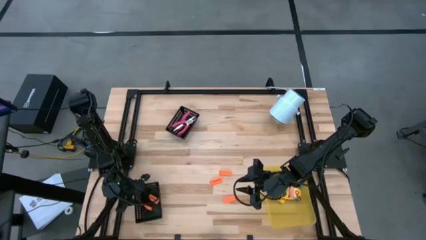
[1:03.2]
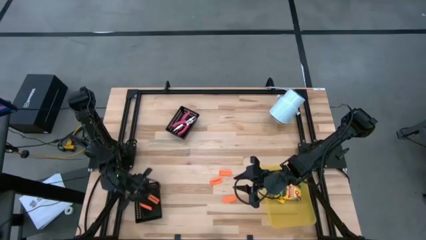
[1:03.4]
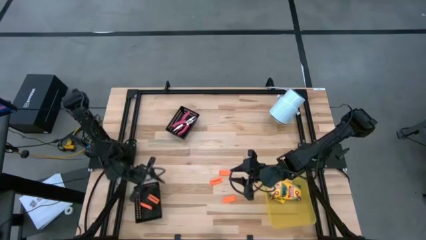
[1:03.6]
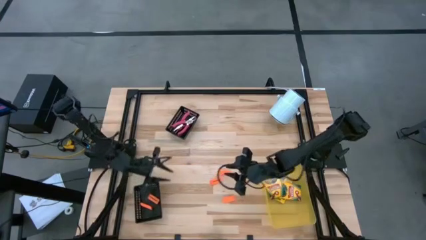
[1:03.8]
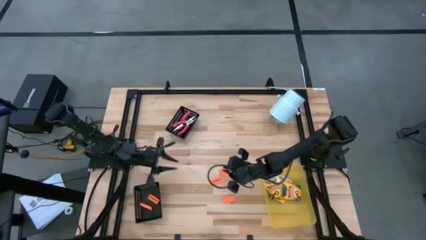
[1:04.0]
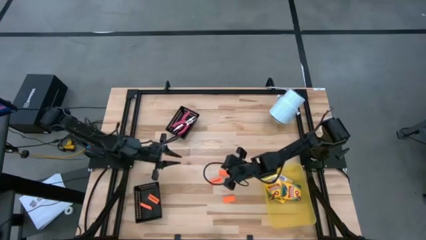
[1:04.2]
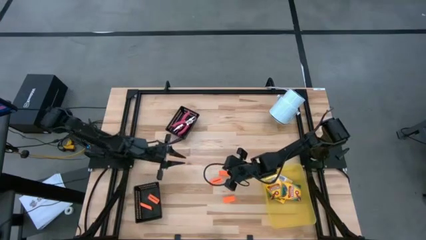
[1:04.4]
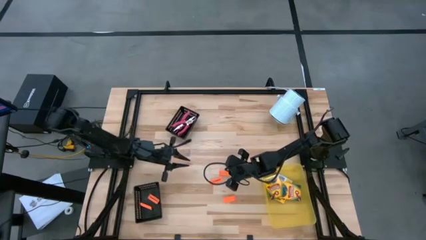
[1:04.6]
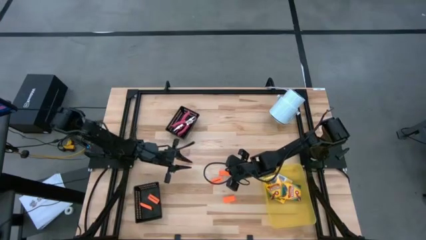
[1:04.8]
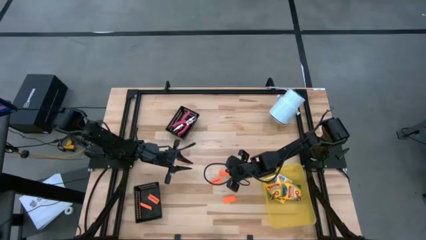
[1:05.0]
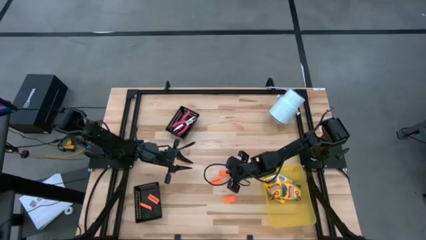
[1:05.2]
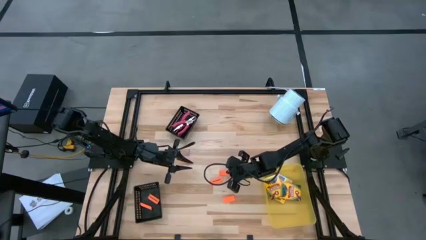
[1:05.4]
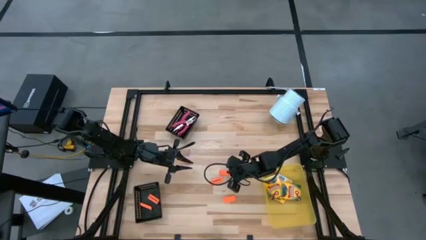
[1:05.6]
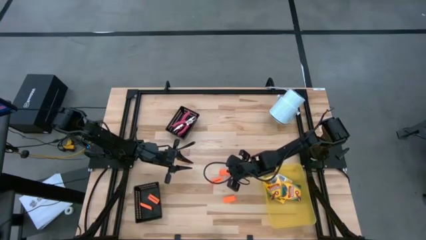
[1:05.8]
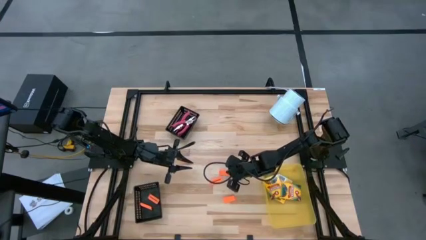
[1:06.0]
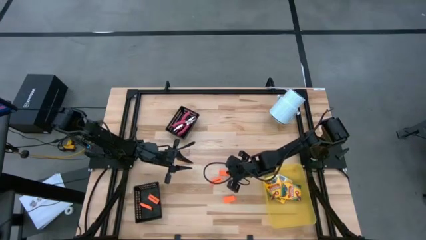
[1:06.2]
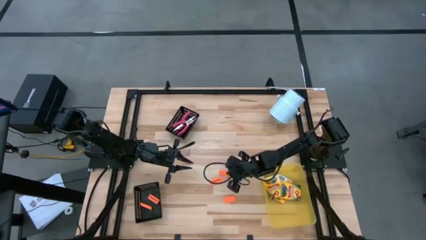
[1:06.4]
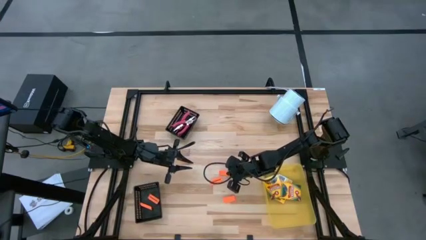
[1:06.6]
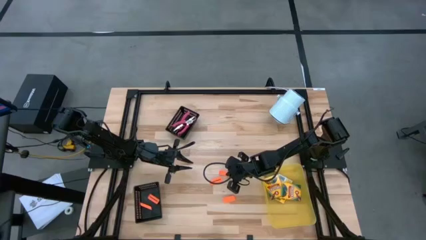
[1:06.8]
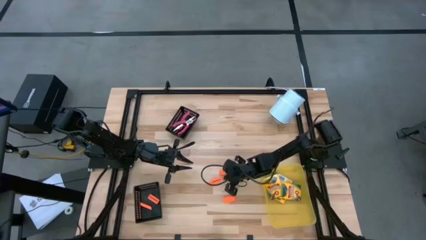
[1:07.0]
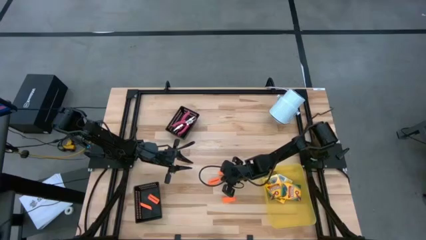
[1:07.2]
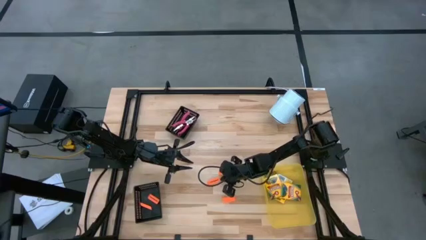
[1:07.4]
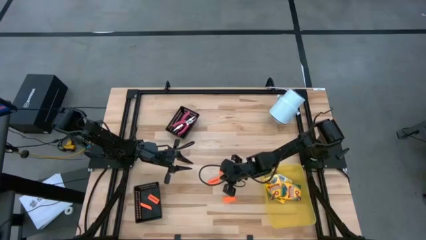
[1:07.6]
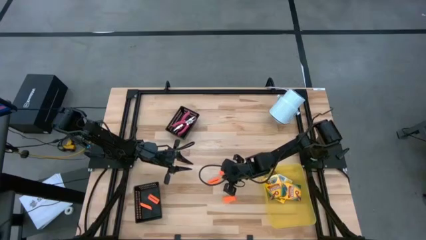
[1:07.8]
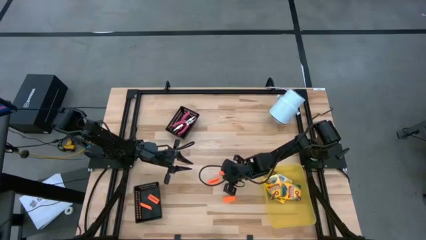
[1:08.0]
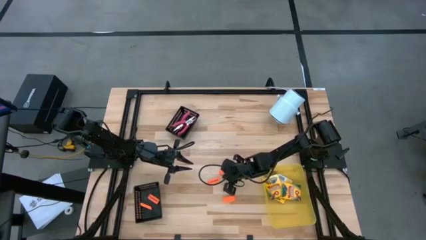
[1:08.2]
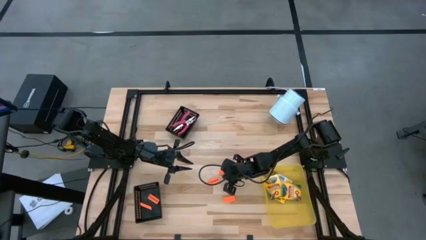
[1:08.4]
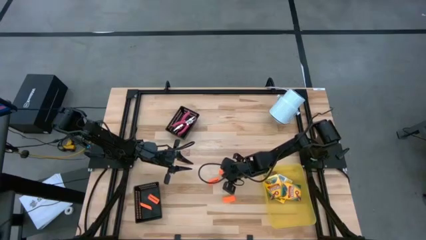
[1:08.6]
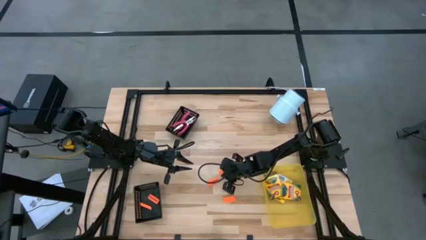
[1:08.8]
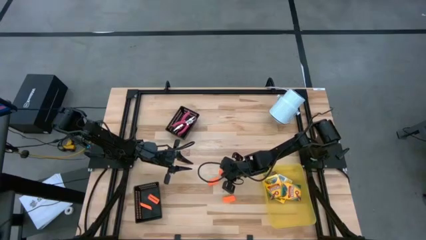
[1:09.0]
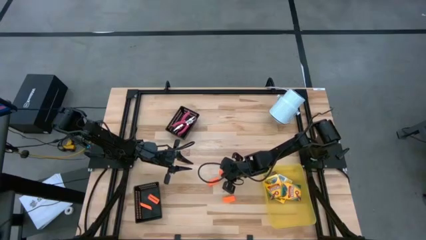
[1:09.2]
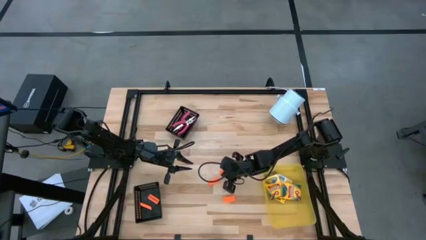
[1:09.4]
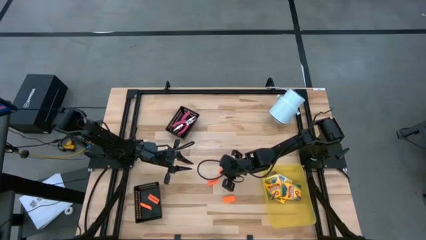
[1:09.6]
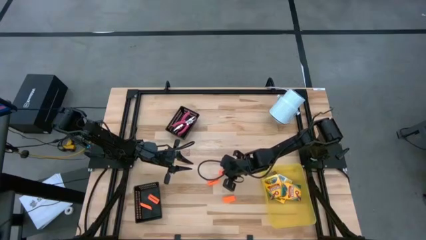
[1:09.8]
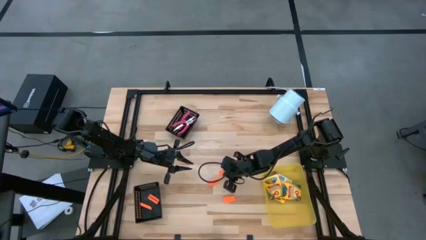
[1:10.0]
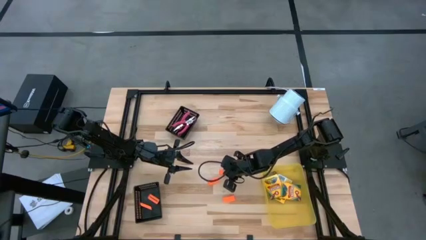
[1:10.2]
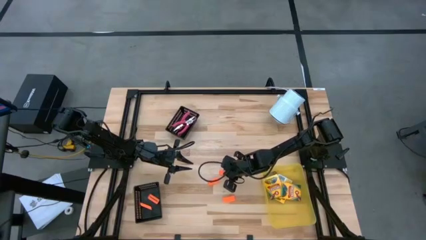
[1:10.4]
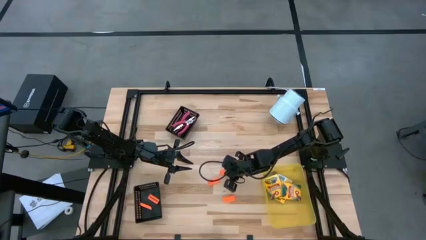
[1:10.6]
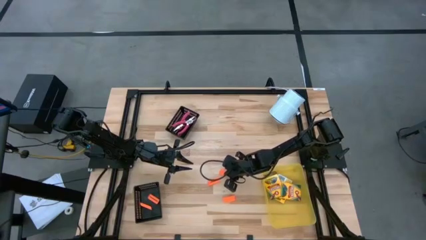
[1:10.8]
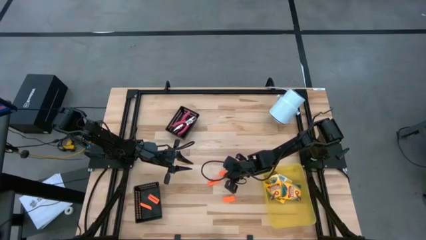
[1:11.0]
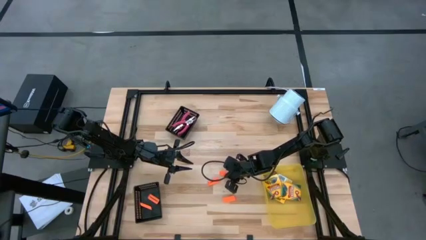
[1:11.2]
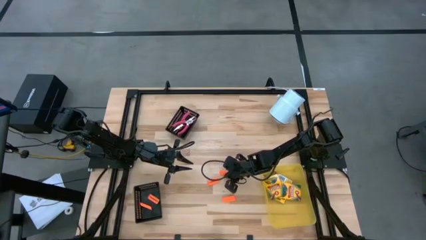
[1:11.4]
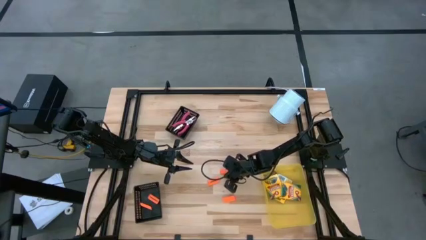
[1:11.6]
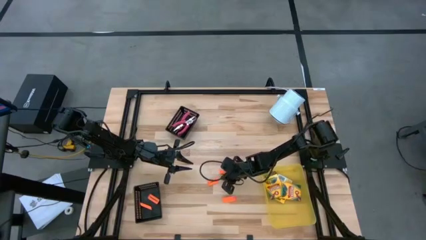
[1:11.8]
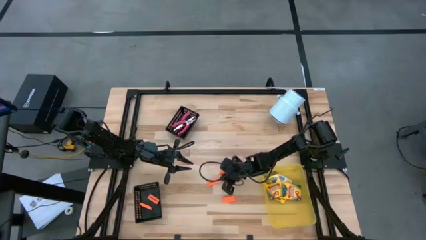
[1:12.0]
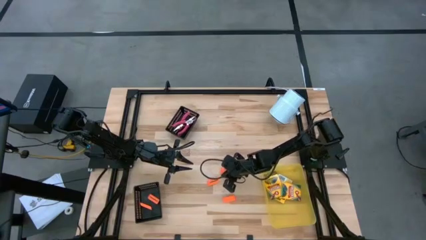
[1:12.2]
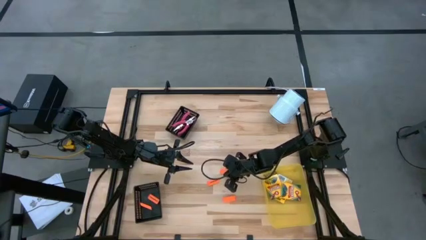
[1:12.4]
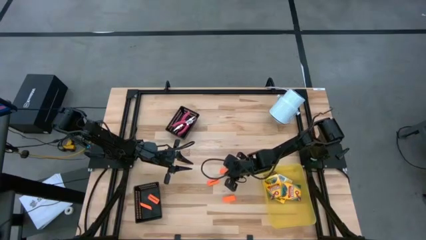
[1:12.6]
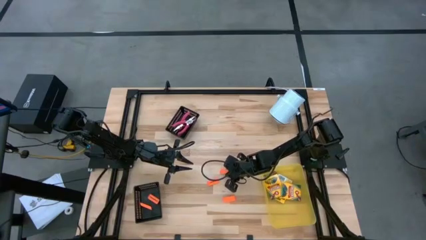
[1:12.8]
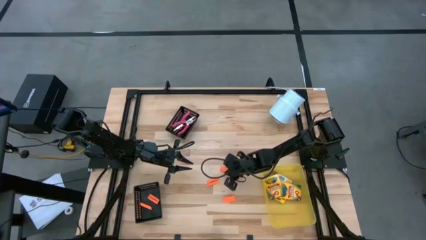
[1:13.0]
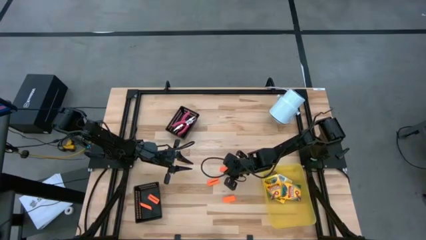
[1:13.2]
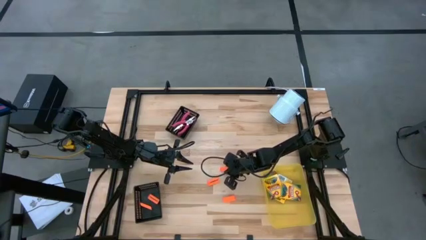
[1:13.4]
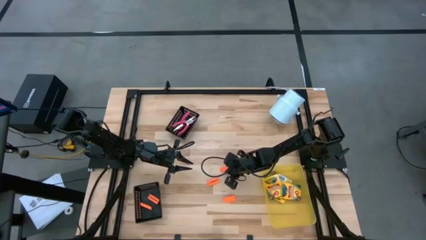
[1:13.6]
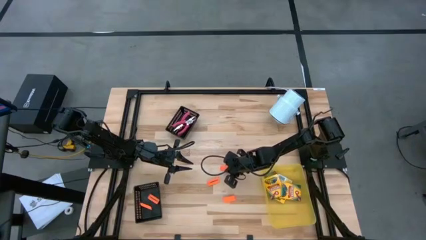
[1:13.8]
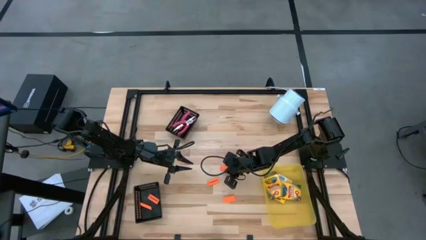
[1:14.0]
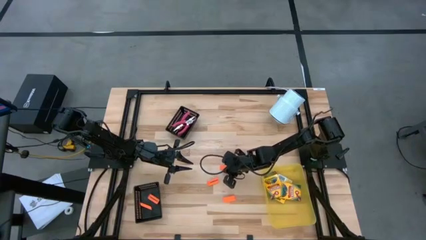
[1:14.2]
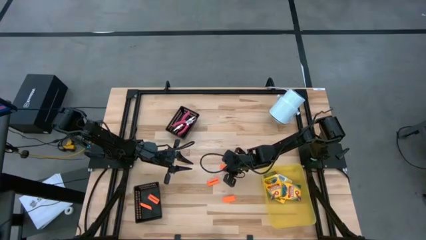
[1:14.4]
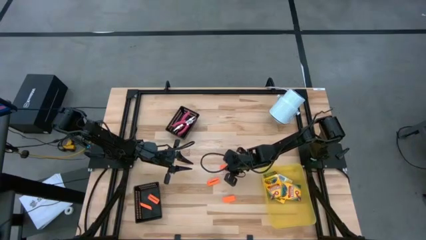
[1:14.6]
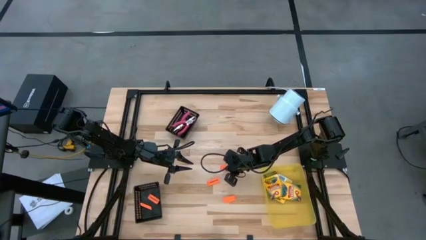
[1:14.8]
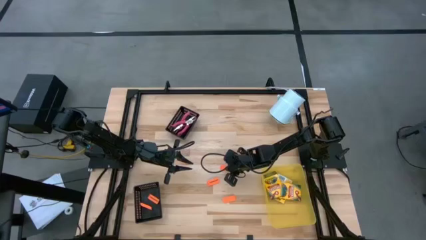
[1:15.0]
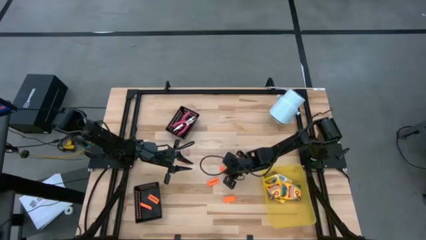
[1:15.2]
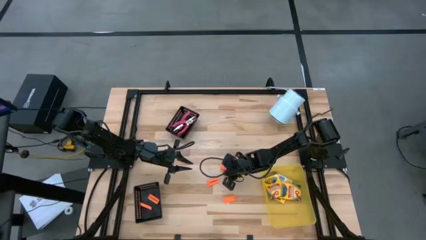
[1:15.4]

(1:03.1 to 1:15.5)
Task: Pick & Place School Supplies
Put the orange eraser into the bottom black basket

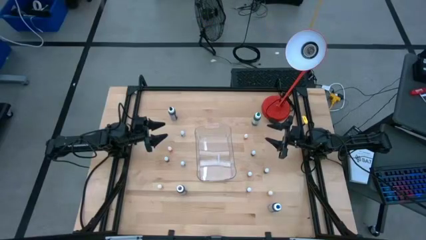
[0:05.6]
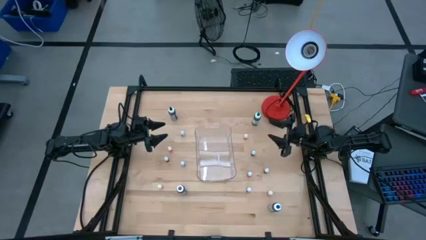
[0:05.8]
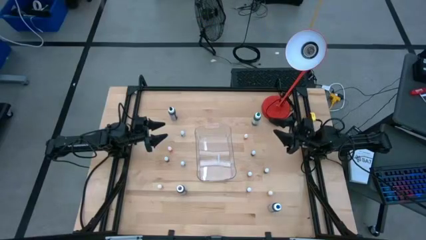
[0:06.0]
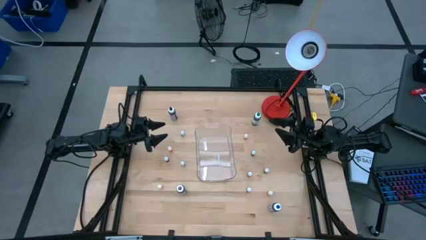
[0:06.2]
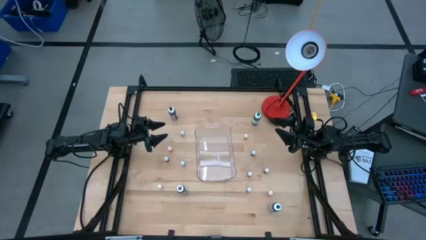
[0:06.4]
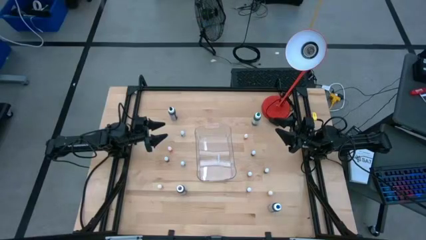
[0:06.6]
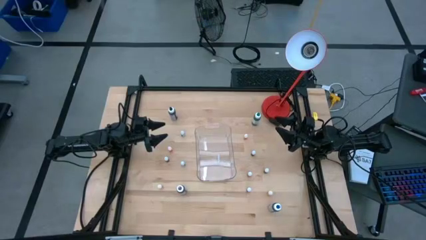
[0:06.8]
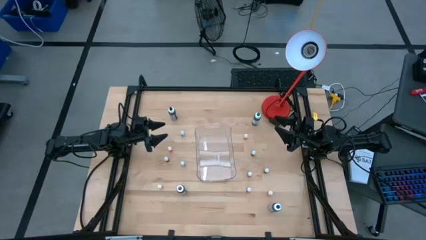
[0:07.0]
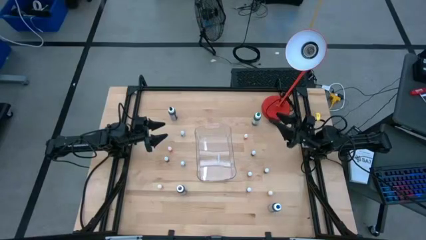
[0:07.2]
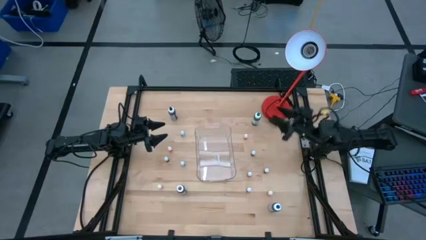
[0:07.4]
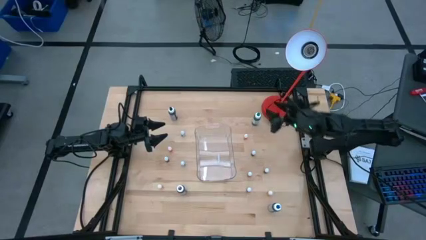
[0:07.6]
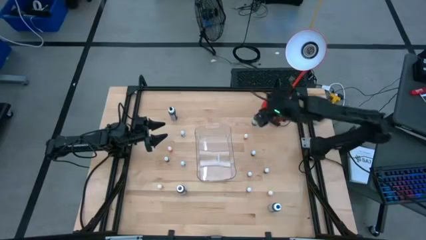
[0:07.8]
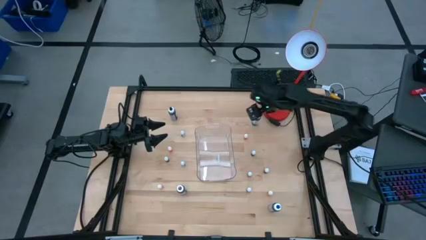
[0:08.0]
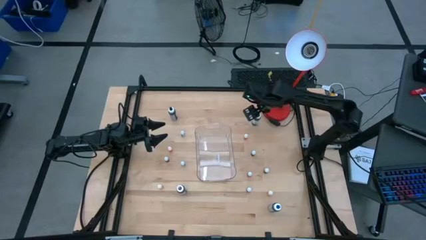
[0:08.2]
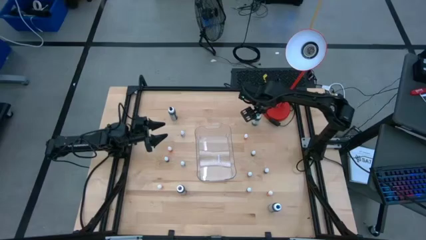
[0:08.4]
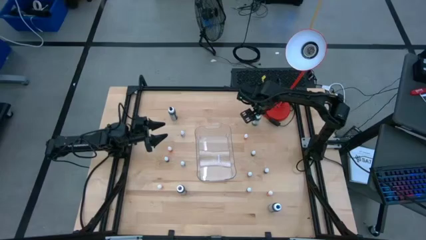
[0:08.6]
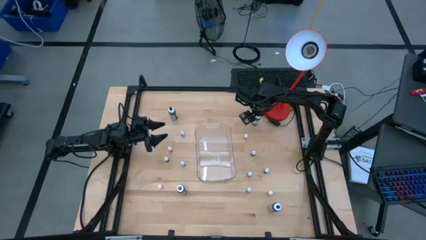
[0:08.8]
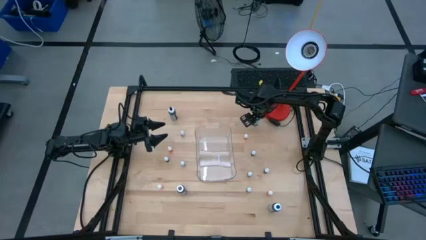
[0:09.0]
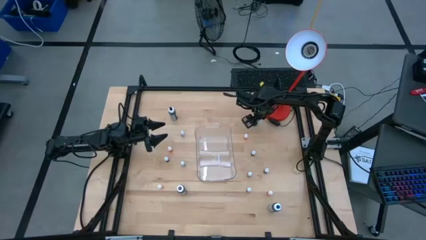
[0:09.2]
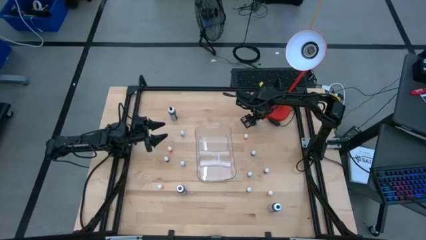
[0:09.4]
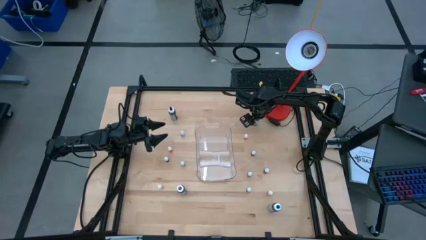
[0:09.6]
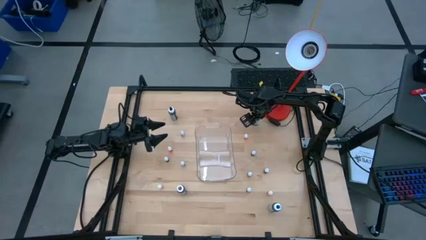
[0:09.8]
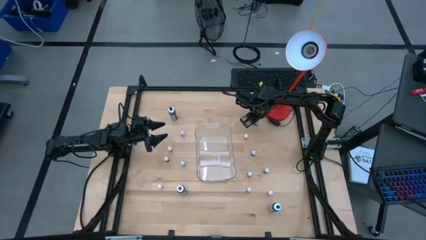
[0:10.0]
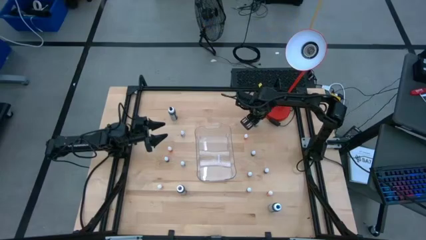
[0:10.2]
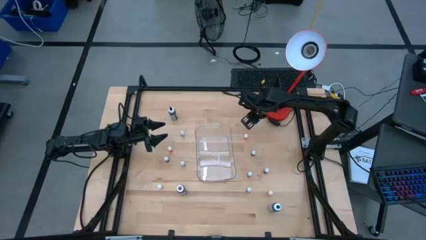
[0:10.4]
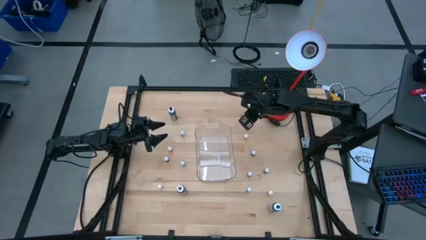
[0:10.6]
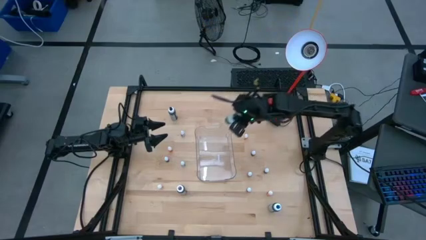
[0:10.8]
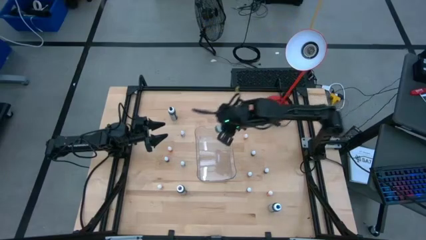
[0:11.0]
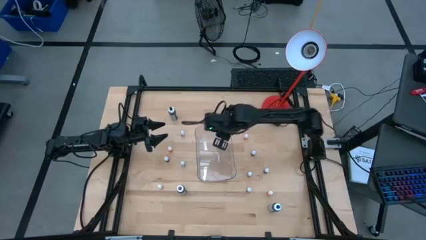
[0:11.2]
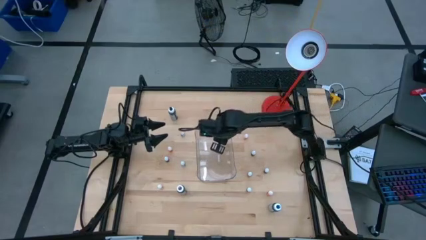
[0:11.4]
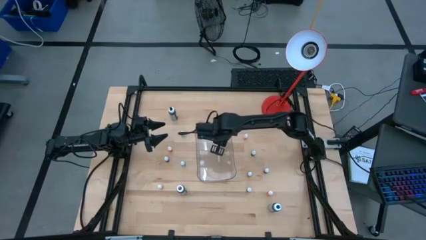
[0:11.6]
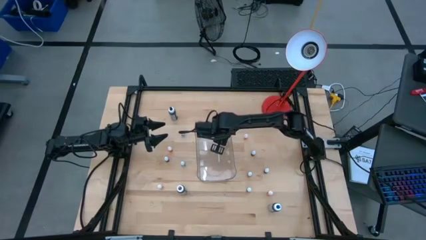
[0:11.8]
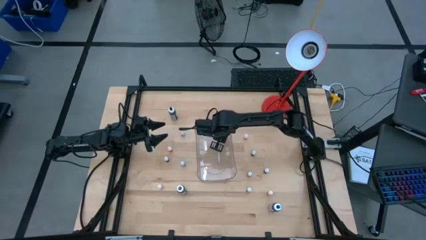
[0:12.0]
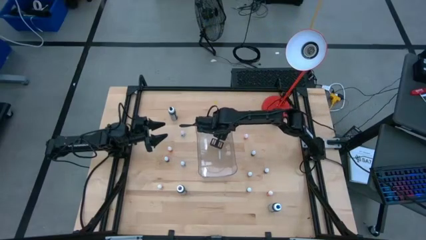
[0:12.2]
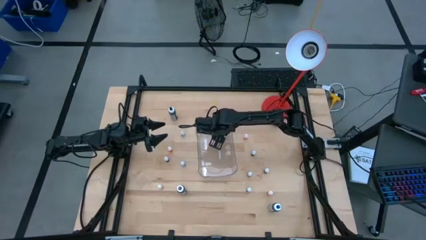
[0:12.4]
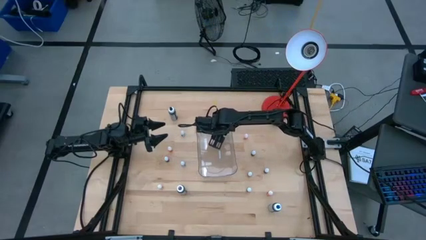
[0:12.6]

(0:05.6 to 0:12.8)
Task: Pick & Place food coloring
Put the big green food coloring bottle into the transparent bin
